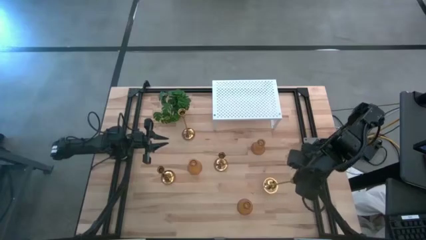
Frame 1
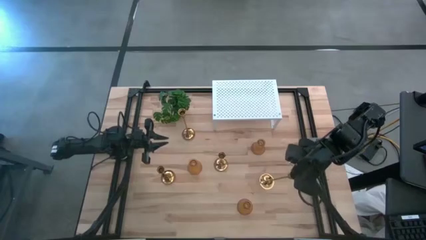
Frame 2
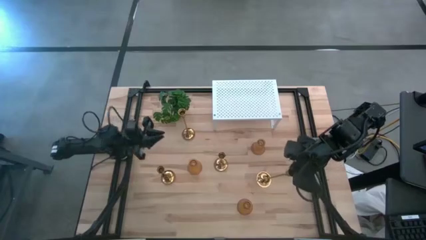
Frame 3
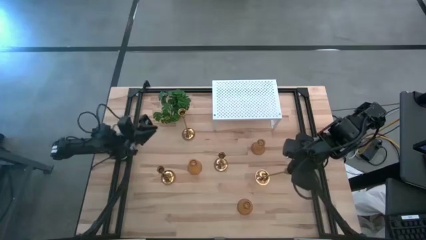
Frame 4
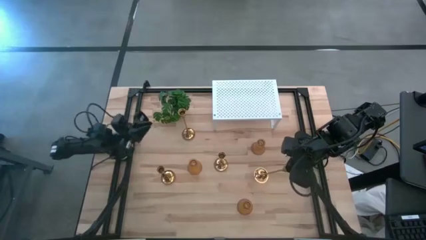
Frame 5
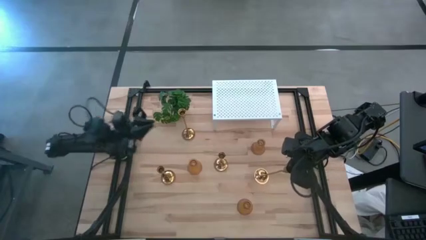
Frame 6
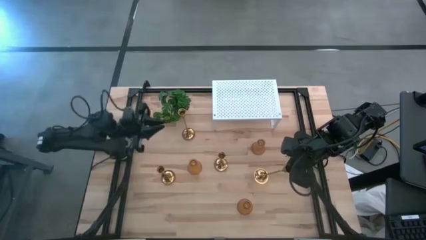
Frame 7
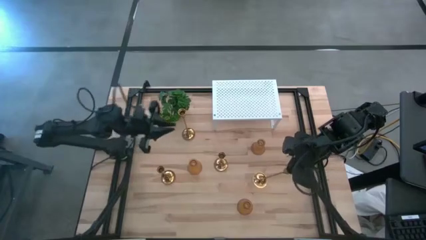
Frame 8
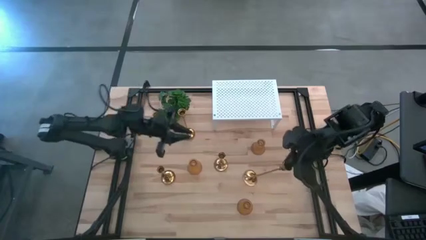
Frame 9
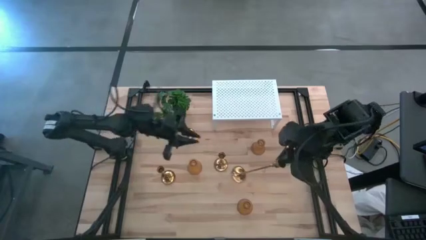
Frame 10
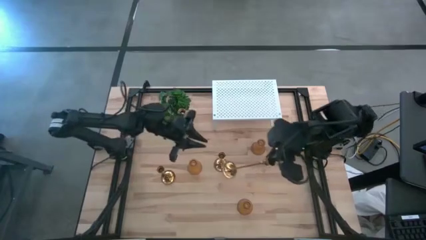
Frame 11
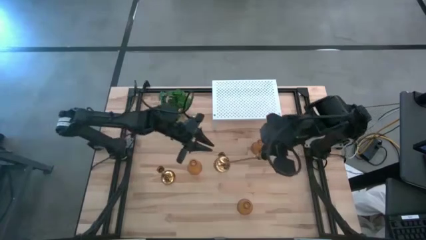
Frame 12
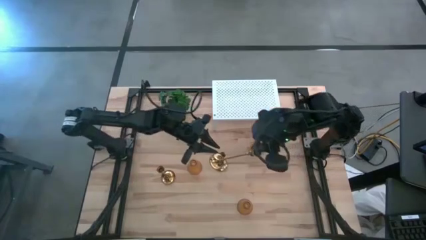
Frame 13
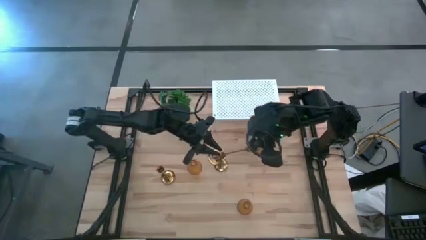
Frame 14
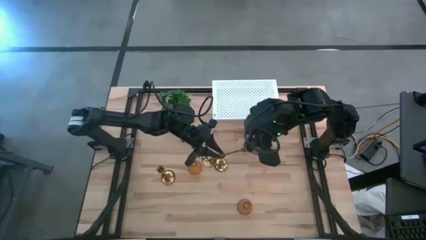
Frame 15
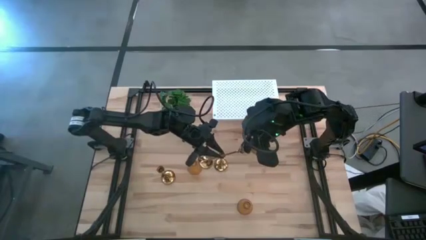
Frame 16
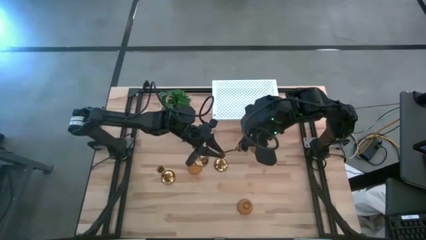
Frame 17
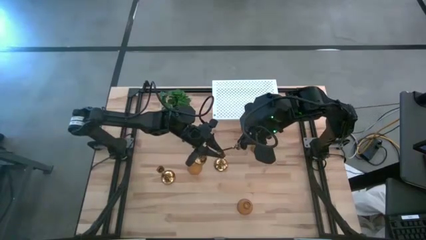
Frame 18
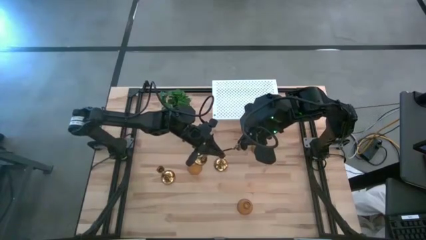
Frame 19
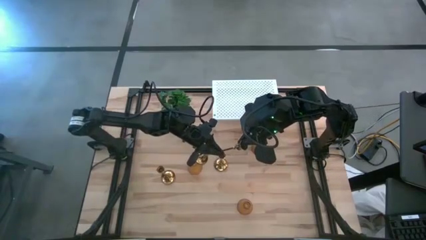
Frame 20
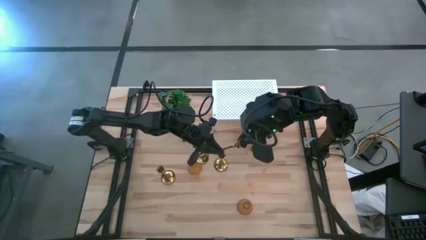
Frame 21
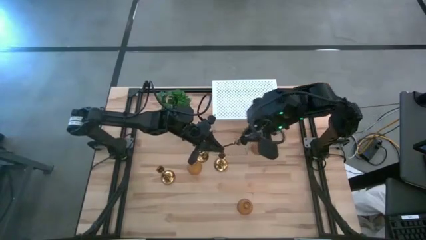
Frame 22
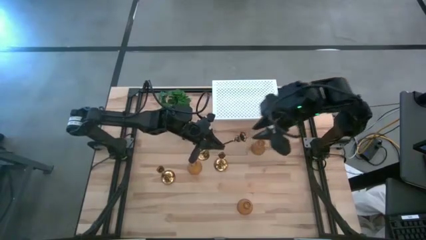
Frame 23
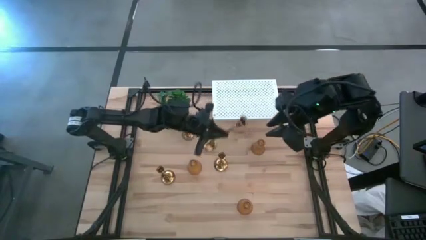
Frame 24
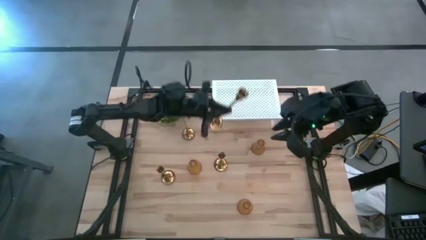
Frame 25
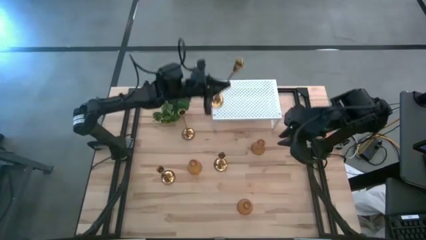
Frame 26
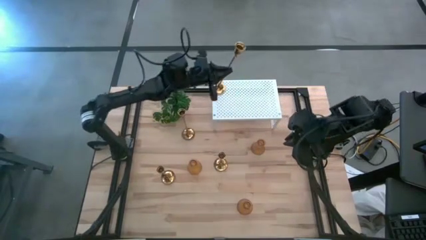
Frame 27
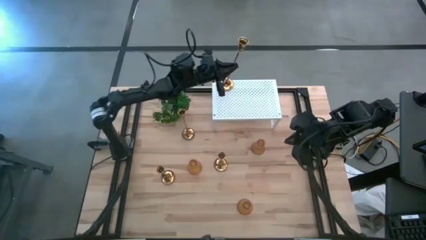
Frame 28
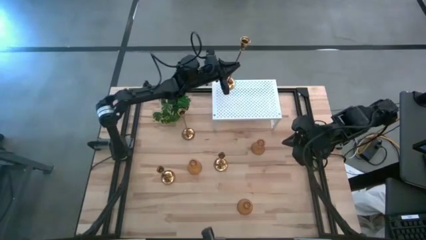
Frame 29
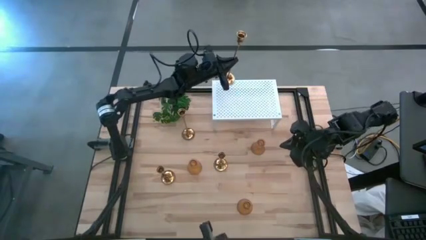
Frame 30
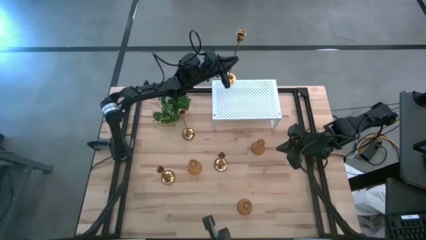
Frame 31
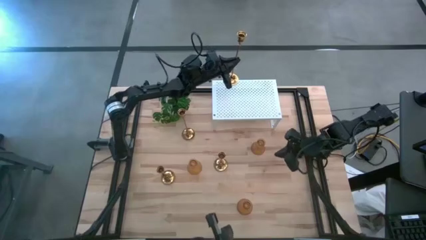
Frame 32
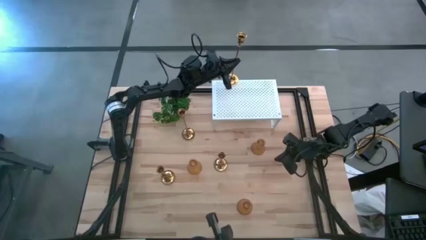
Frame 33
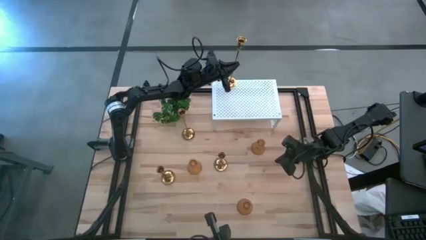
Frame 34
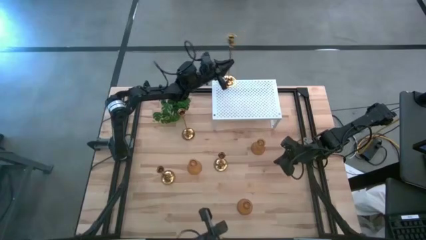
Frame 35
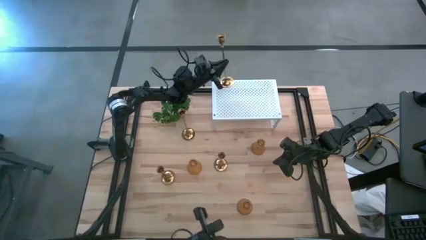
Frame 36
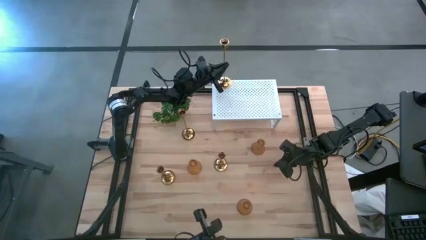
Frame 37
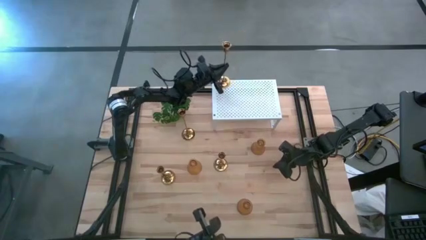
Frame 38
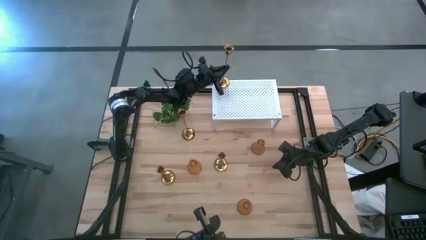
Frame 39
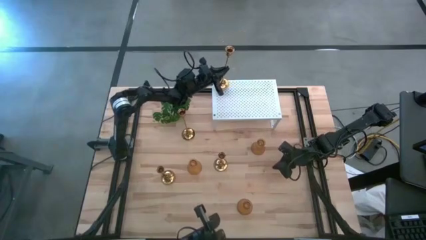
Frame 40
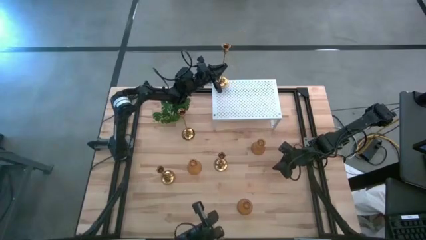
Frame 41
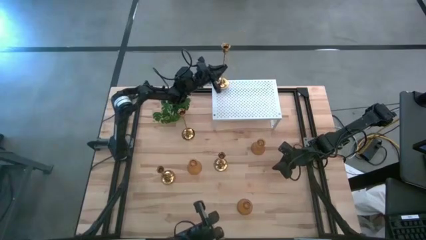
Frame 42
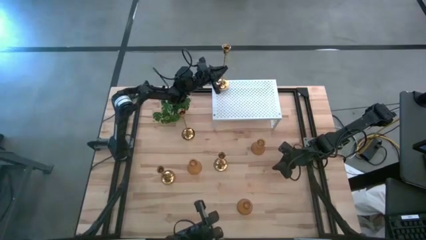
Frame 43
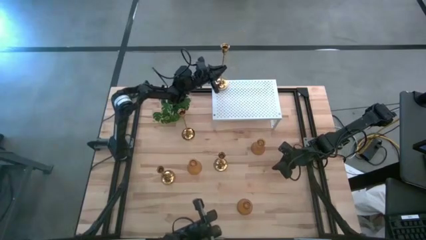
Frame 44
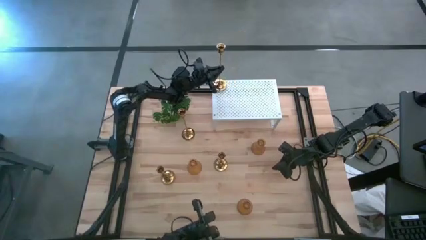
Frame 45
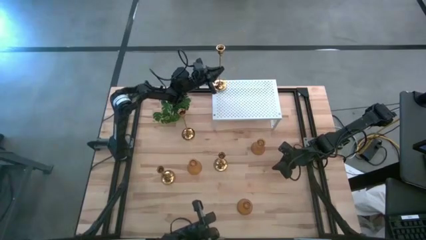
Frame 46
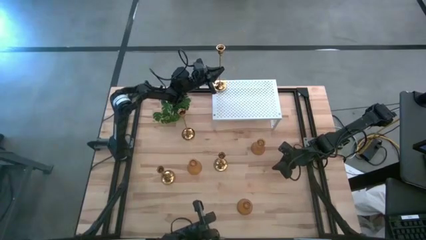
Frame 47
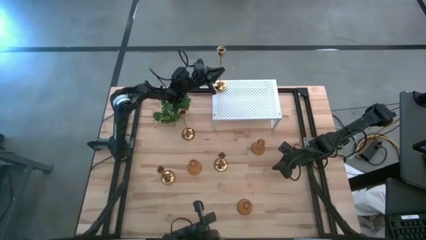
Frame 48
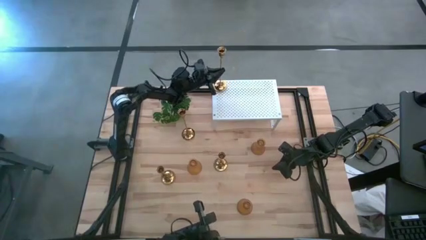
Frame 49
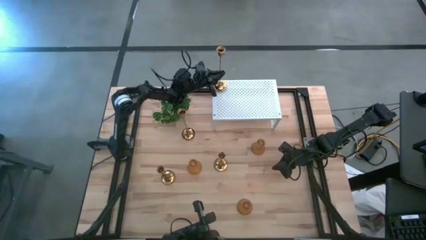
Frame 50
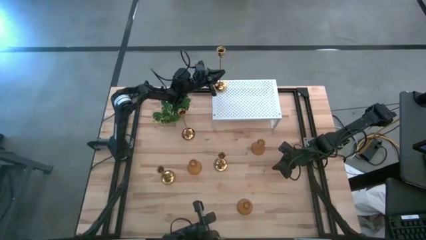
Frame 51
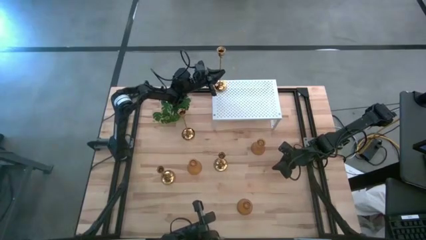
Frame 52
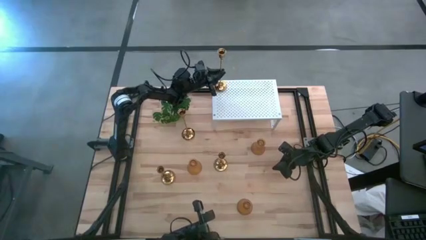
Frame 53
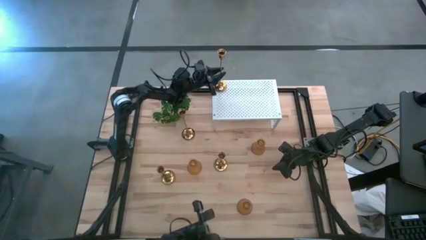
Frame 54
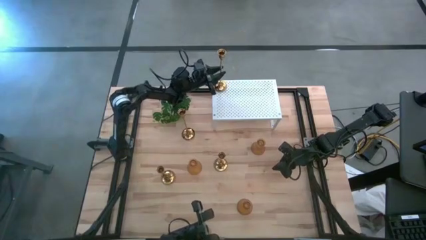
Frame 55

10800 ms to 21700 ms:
Task: Pick & Place candle stick holders
Put the bottom right gold candle holder on the shelf

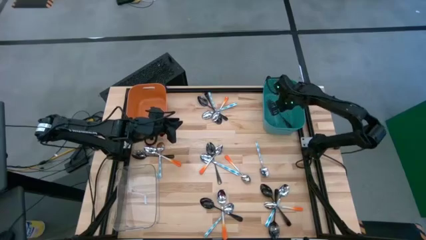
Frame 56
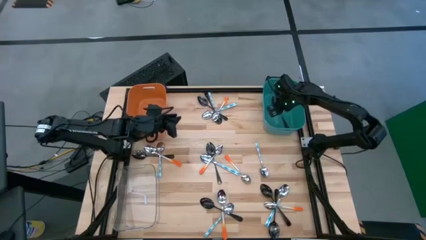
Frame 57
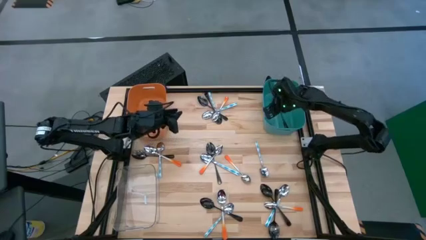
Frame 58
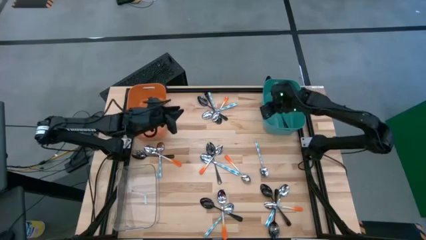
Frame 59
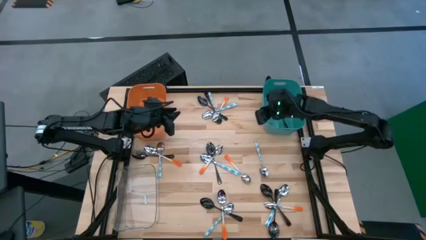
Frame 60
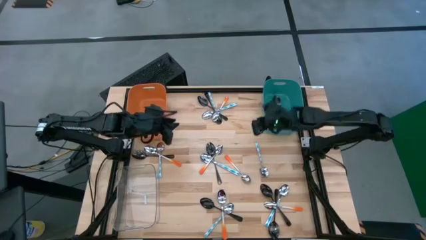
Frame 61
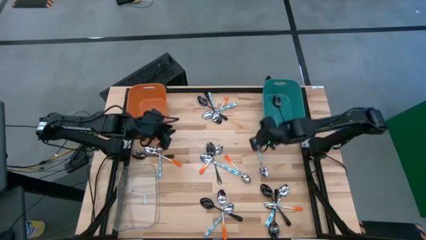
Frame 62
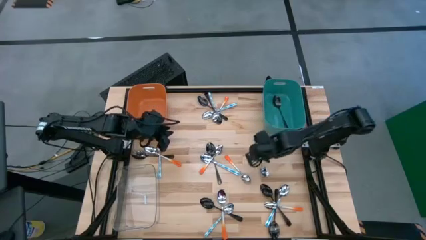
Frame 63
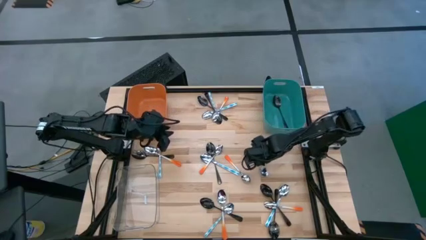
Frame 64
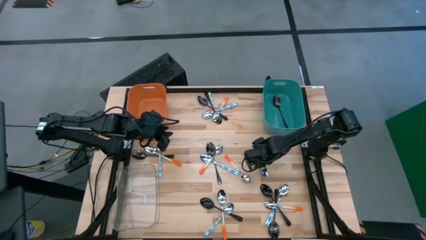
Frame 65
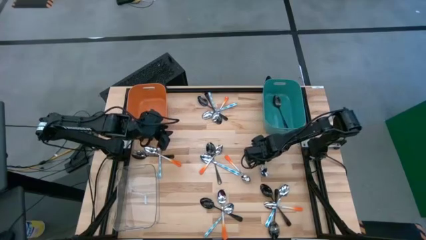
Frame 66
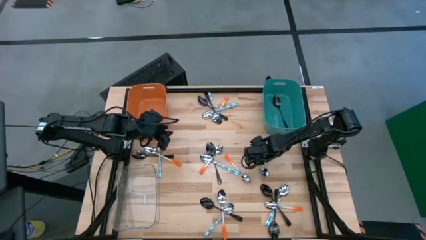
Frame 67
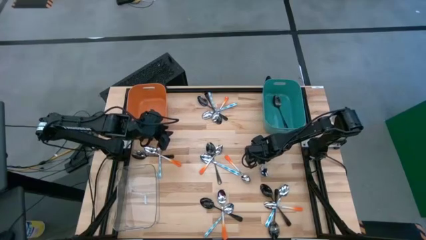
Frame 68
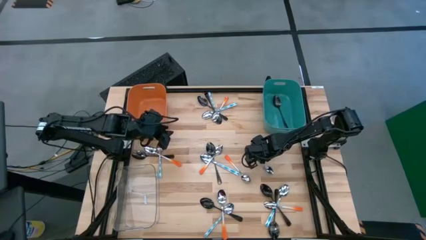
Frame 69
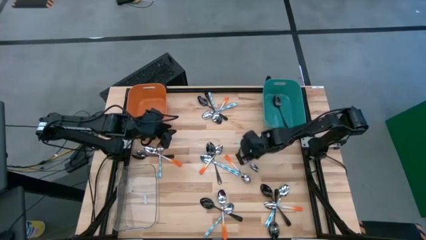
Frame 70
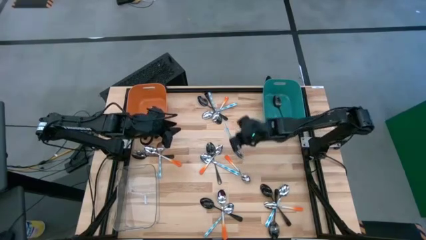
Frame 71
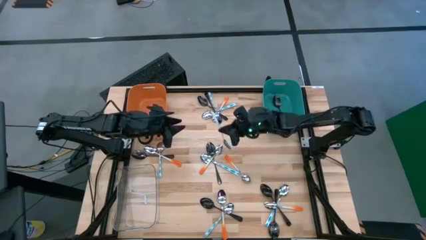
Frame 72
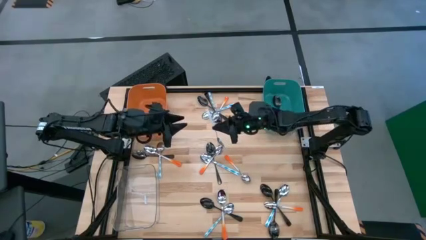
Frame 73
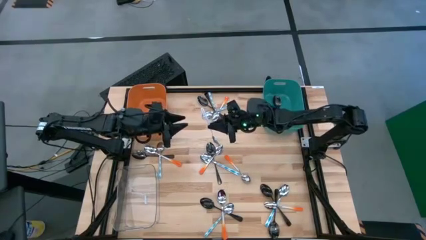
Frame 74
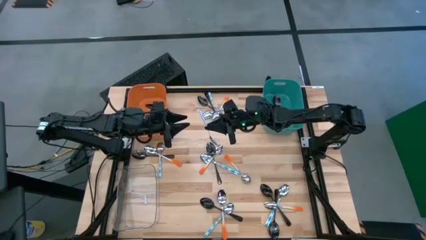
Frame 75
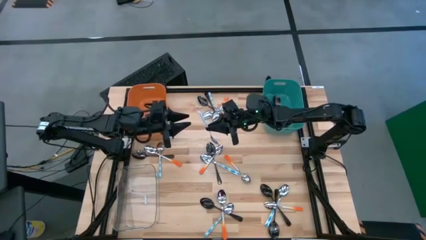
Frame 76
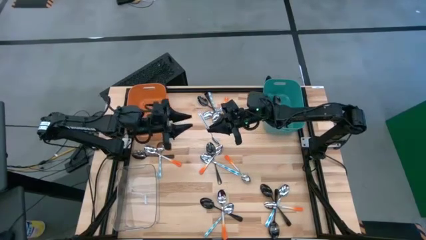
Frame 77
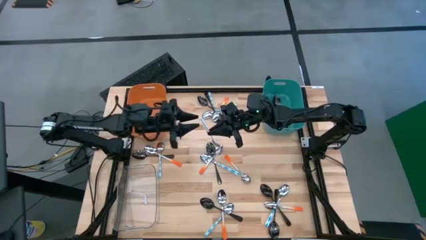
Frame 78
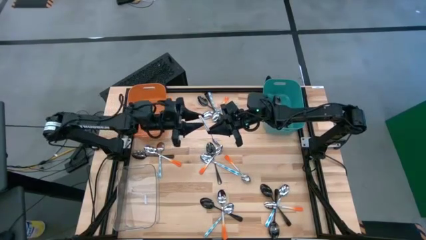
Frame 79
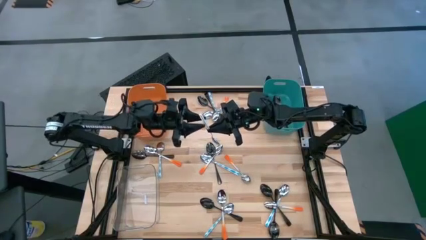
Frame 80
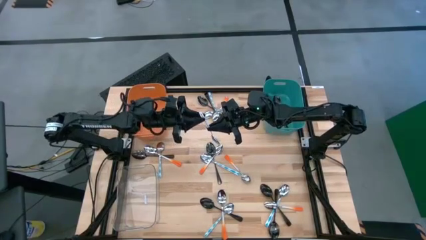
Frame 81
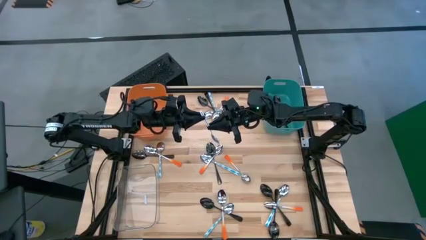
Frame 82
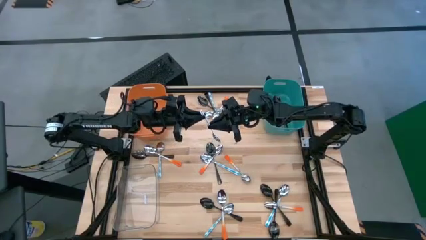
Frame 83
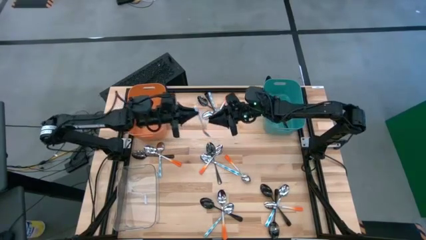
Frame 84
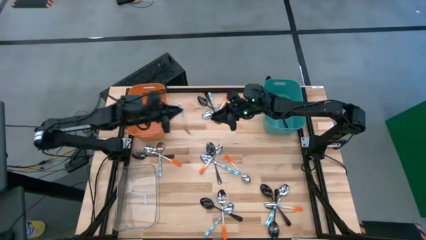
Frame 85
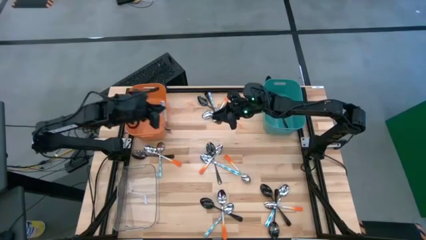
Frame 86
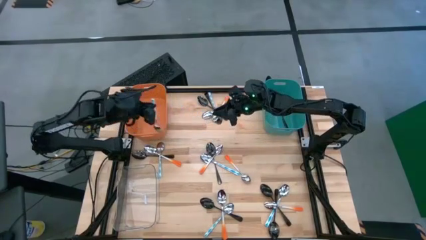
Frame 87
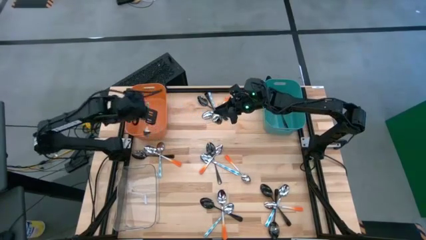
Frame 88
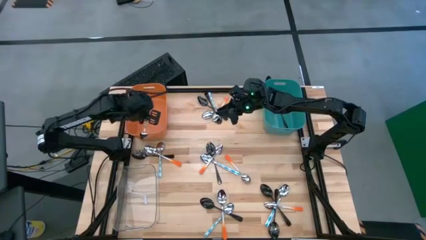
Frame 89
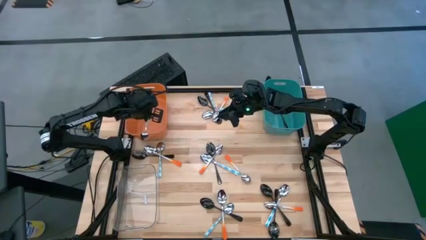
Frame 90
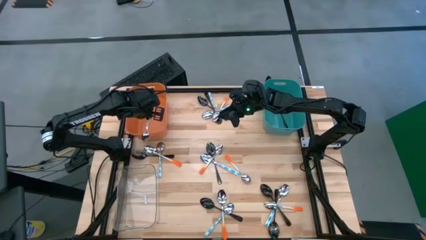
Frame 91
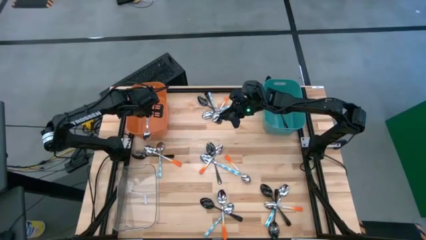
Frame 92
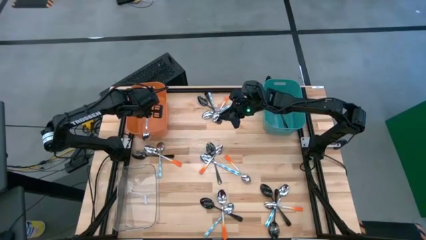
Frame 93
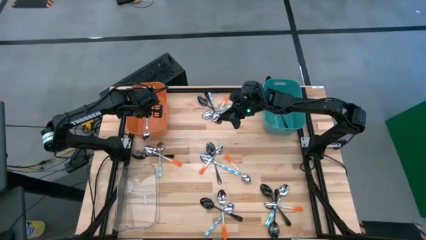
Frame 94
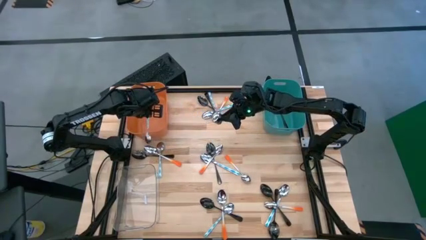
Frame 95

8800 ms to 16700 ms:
Task: Sort silverware by color (type)
Put the white blue spoon into the orange bin
